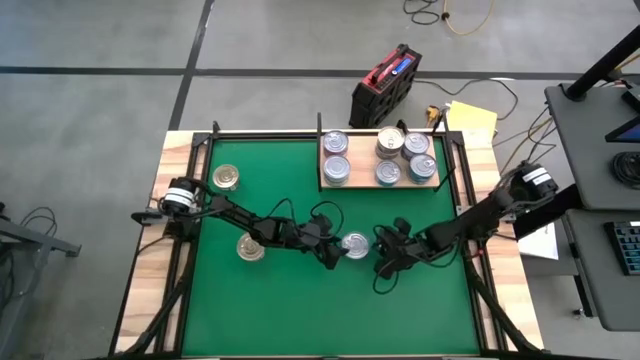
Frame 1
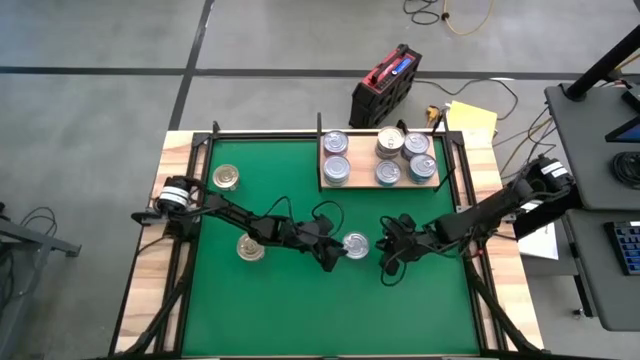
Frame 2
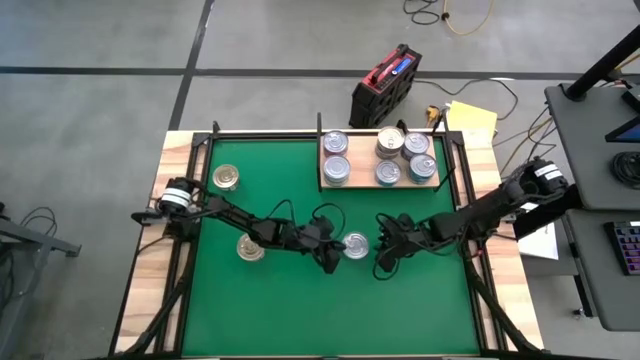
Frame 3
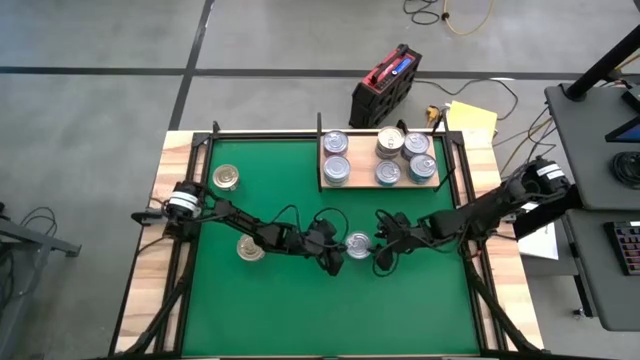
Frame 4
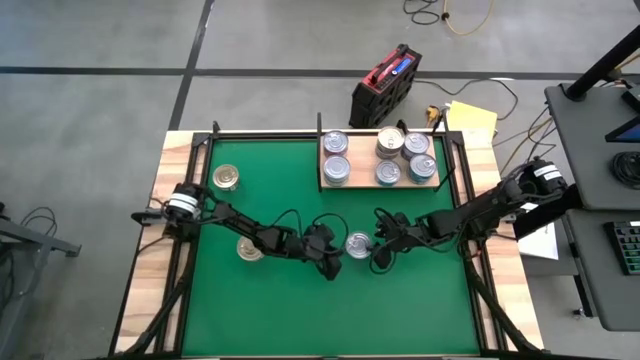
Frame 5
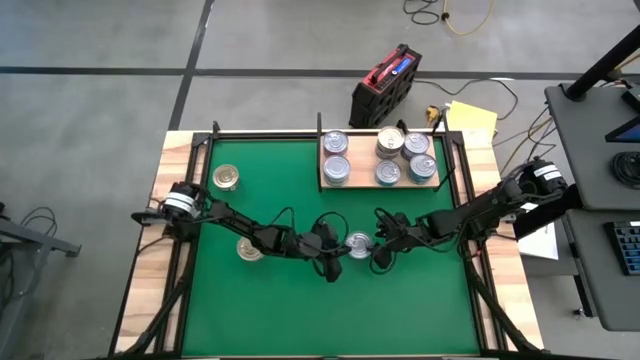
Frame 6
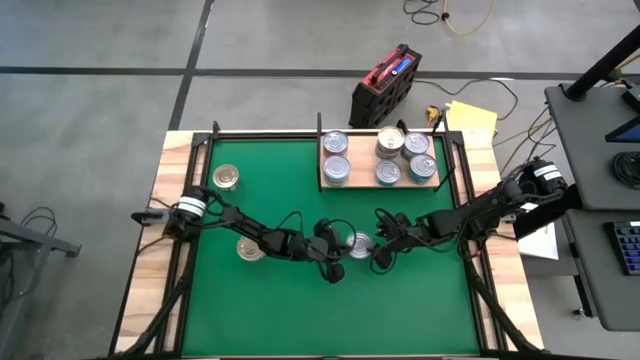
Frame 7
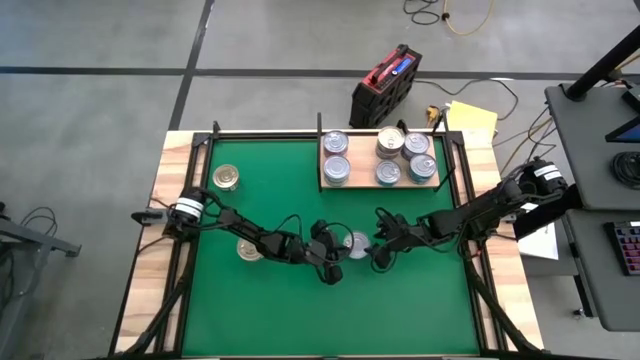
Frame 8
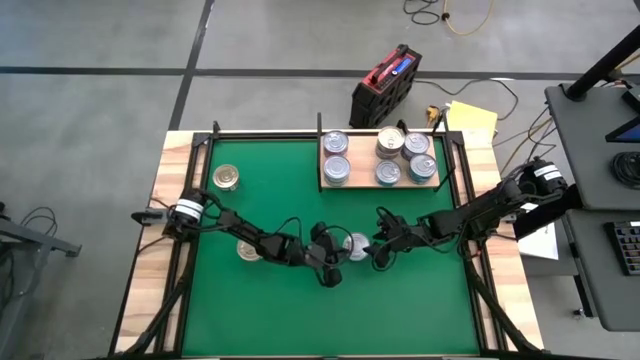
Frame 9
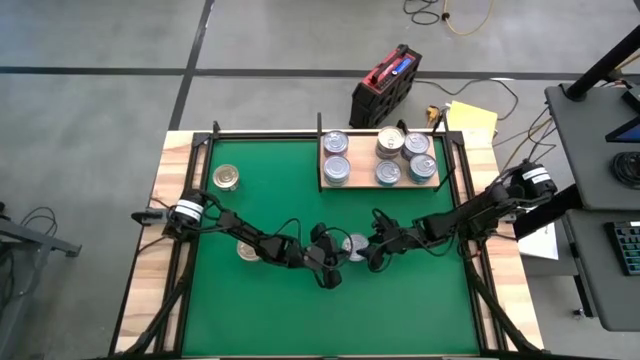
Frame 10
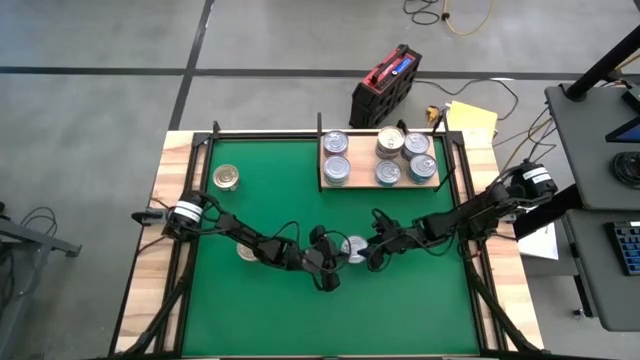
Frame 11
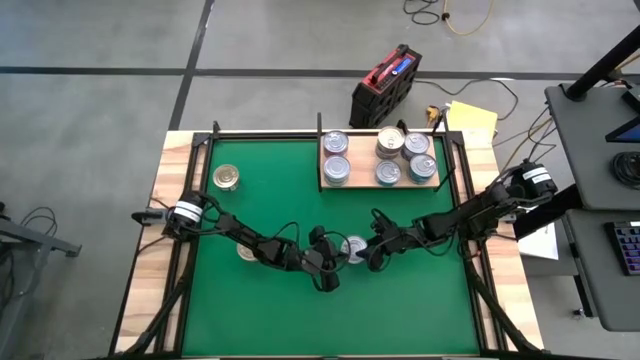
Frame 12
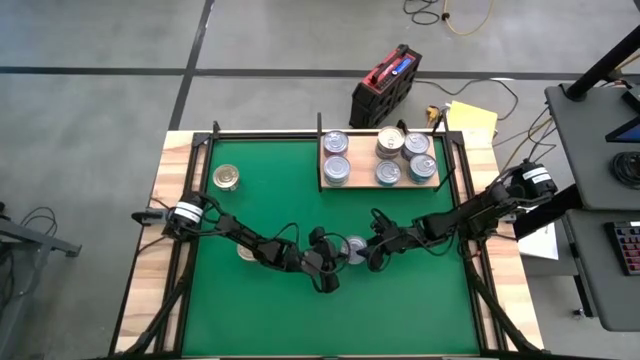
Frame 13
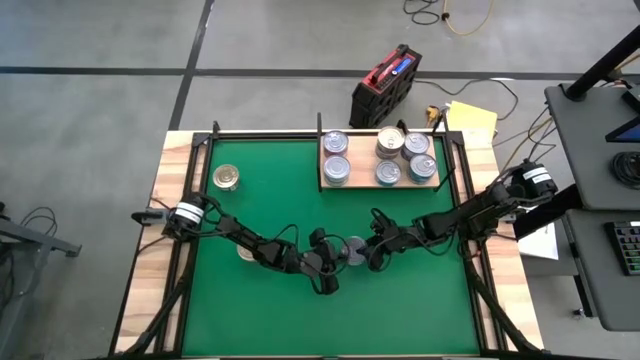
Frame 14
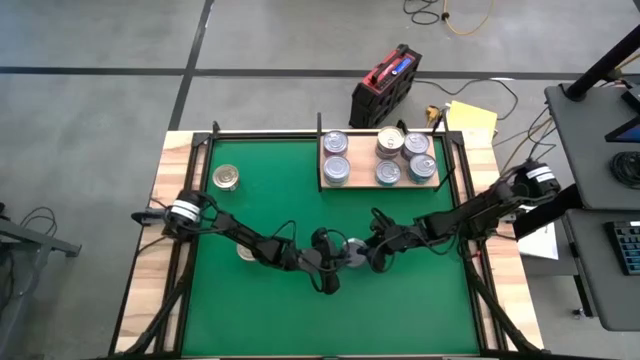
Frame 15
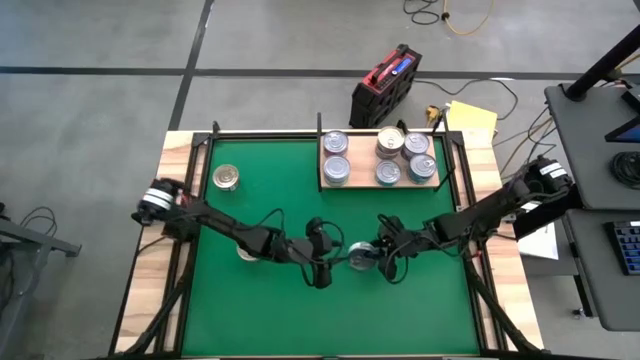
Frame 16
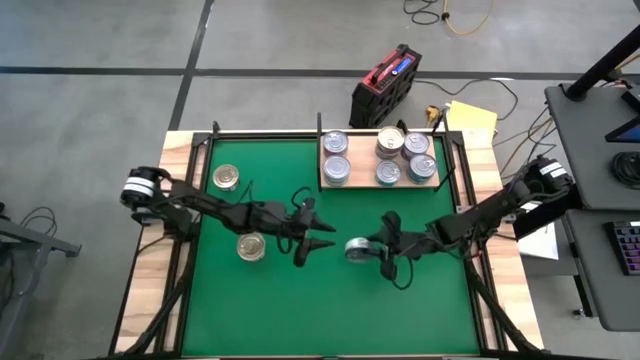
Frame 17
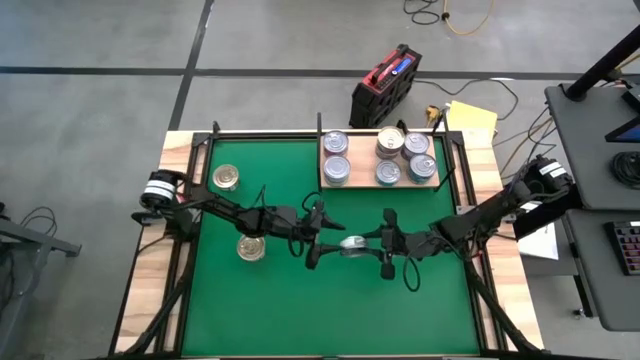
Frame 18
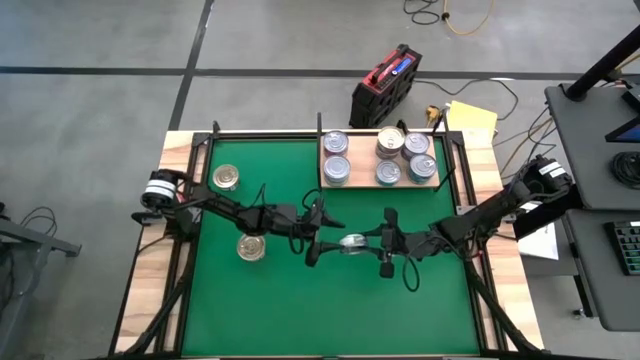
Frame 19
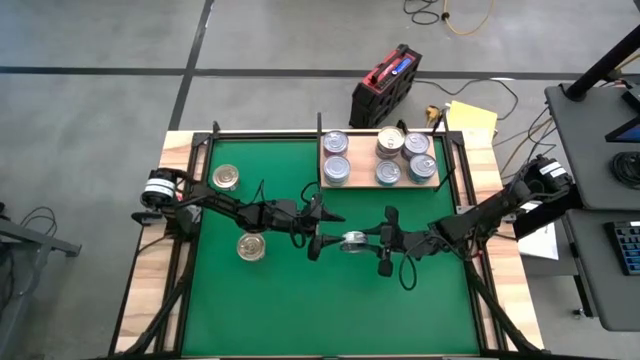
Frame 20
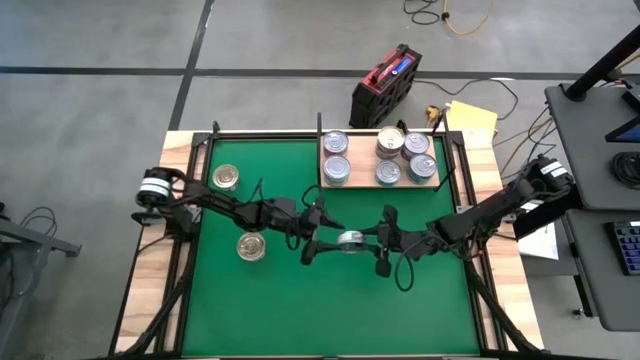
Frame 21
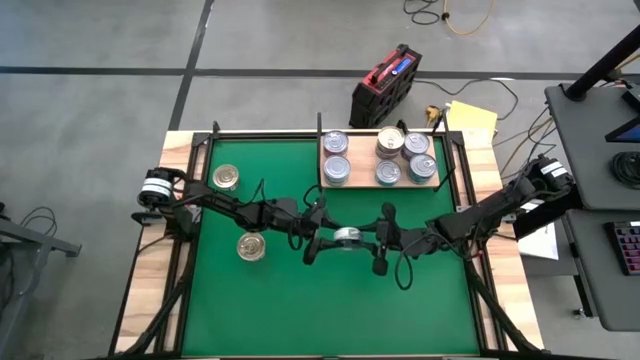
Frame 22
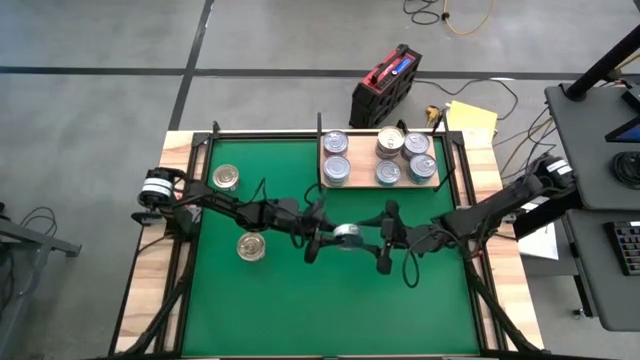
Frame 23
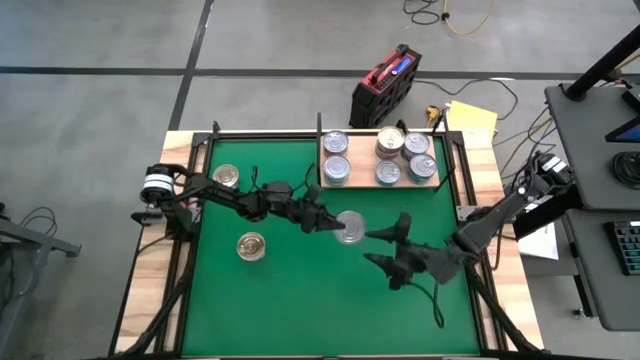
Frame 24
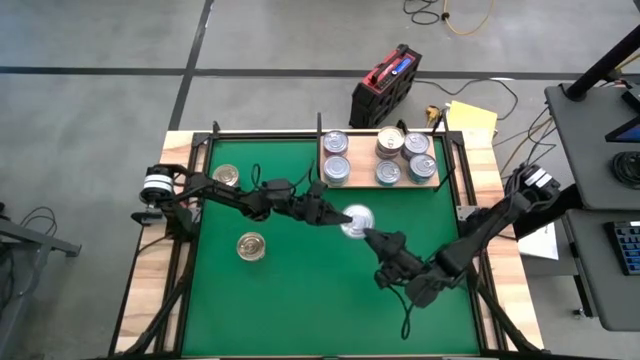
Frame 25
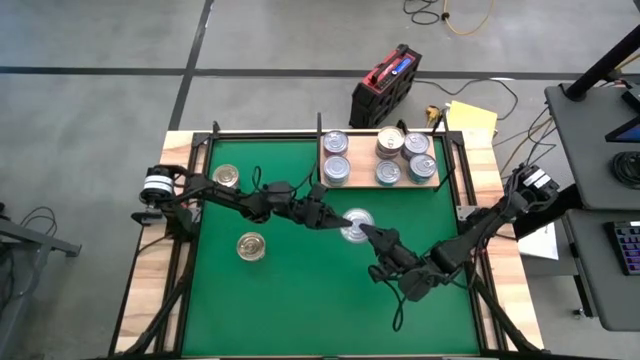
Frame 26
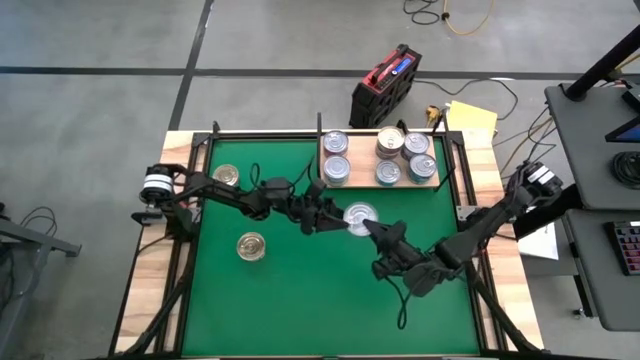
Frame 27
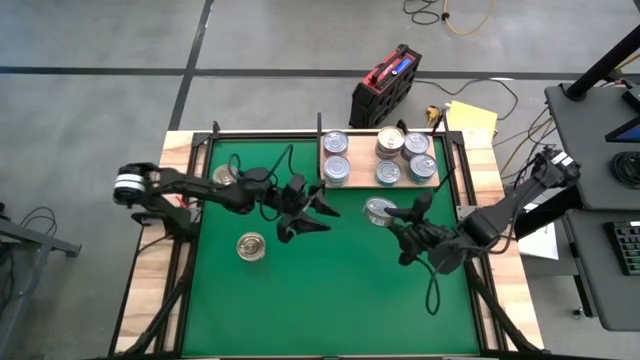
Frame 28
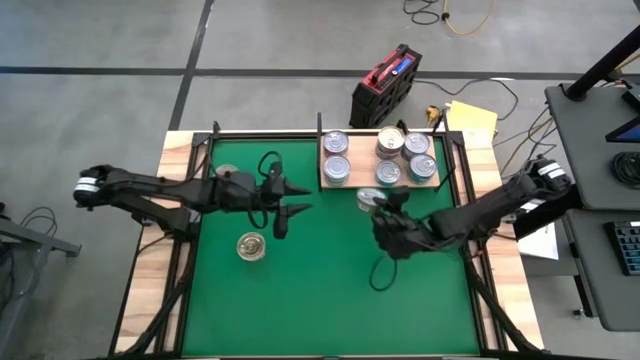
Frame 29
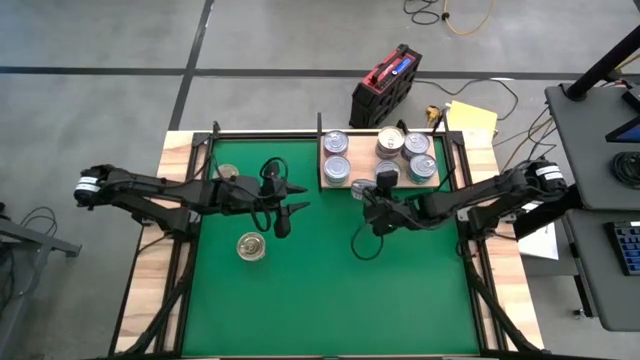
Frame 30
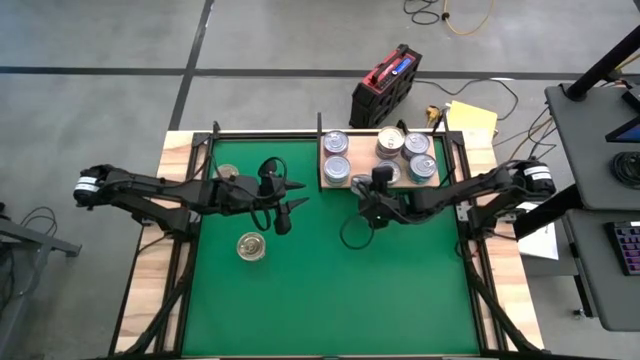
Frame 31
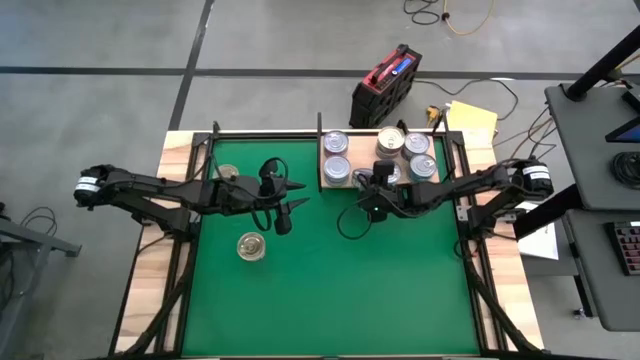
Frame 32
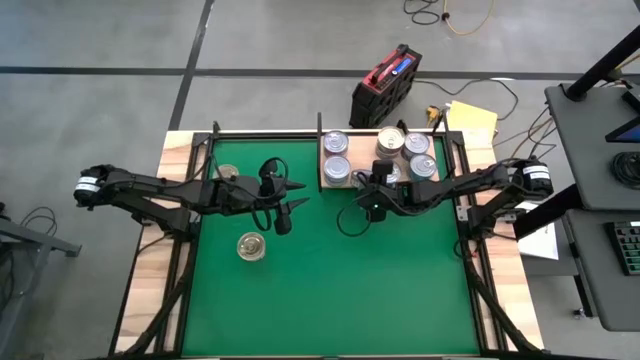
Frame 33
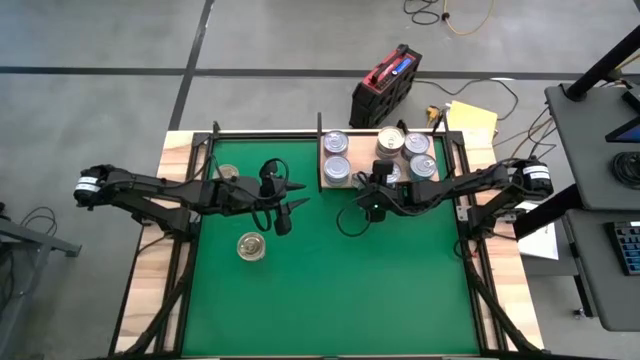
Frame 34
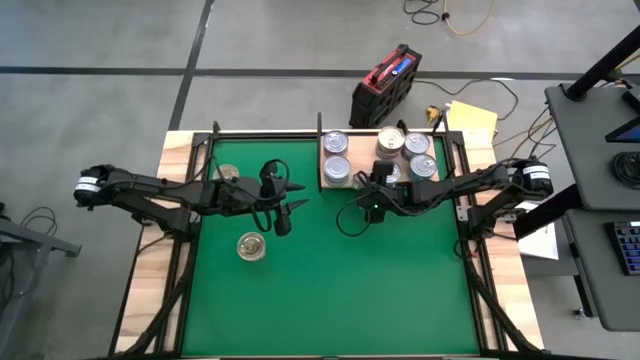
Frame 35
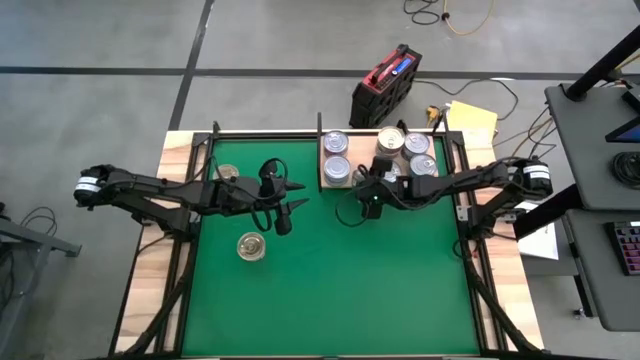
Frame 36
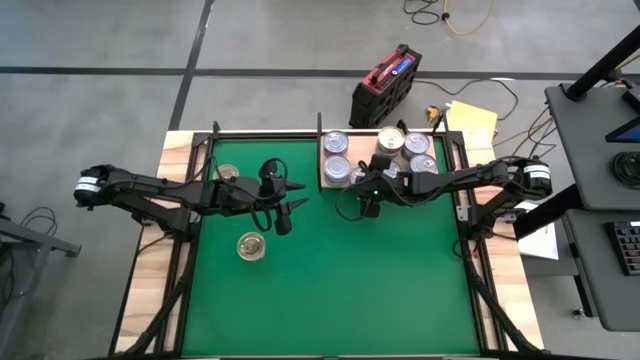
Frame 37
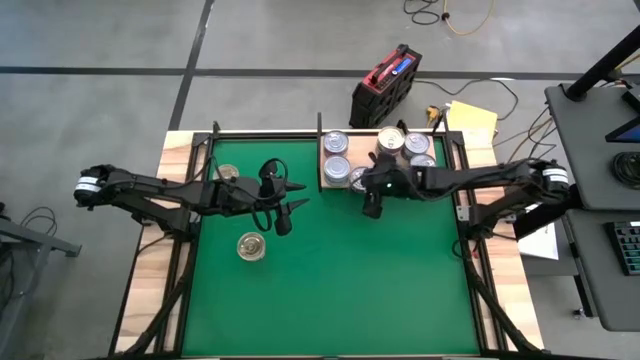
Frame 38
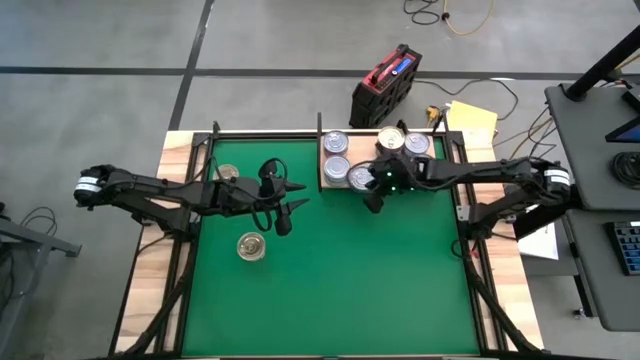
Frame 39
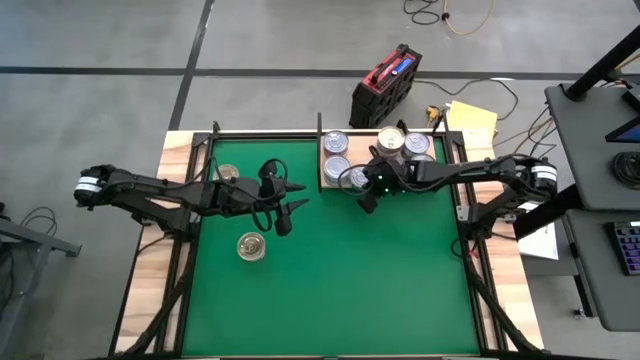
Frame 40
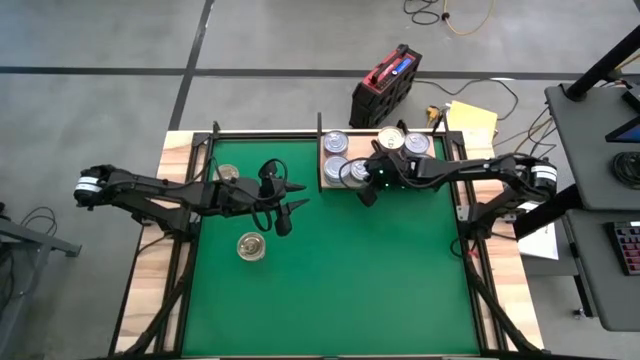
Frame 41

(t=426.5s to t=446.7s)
Task: Stack canned seafood by type on shelf
Put the green tuna can on the shelf

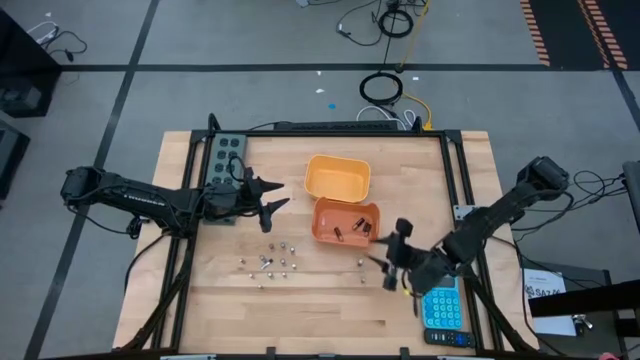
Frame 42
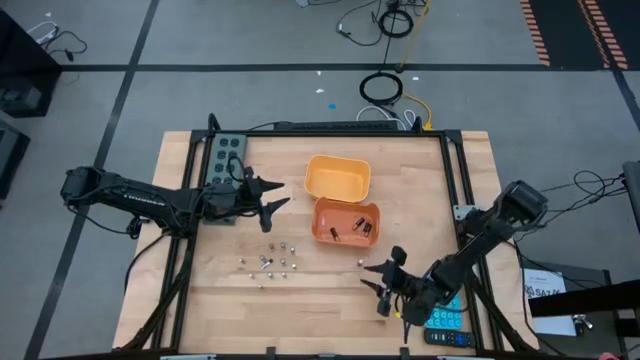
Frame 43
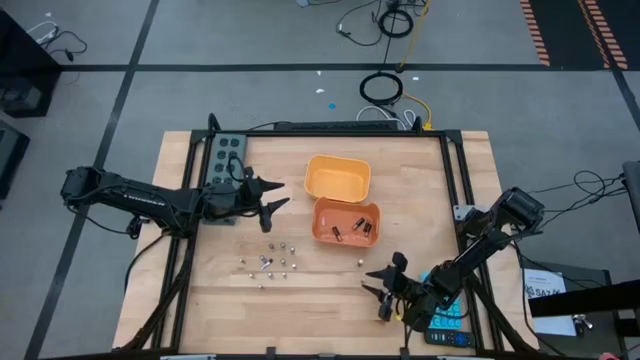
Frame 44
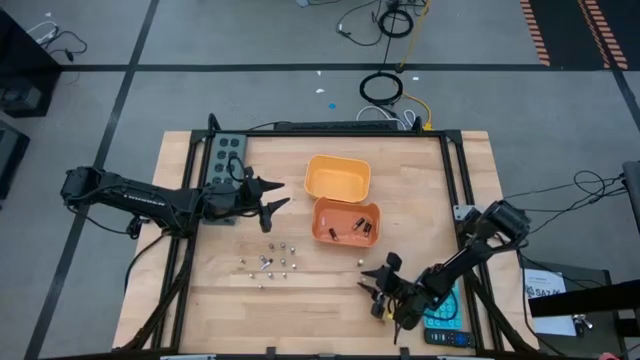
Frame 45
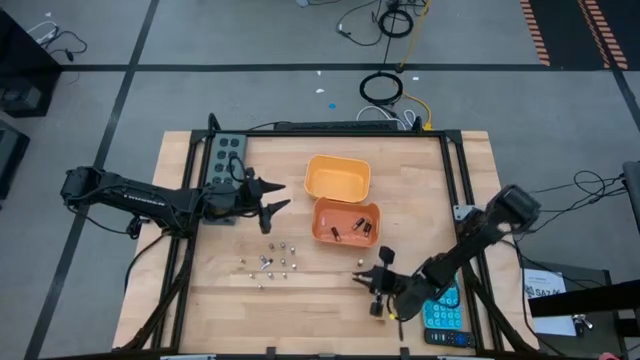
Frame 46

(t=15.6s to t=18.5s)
Task: Sort batteries
Put the black battery into the orange bin
